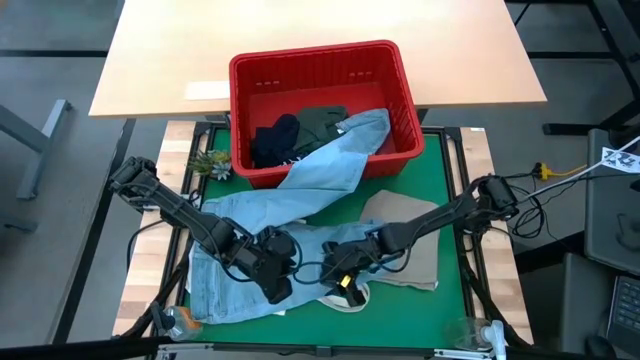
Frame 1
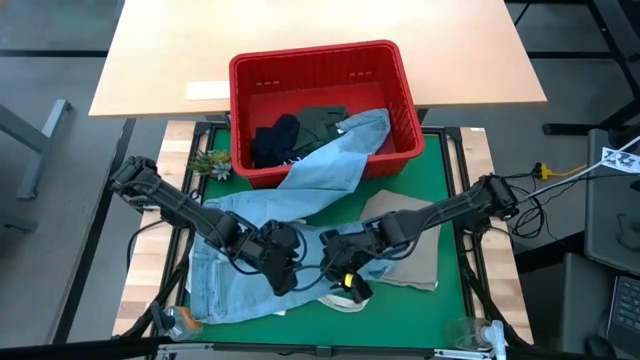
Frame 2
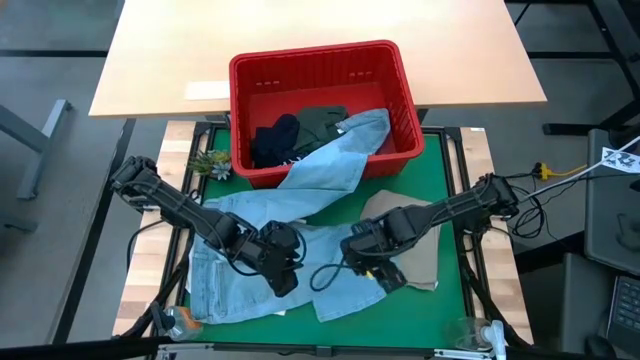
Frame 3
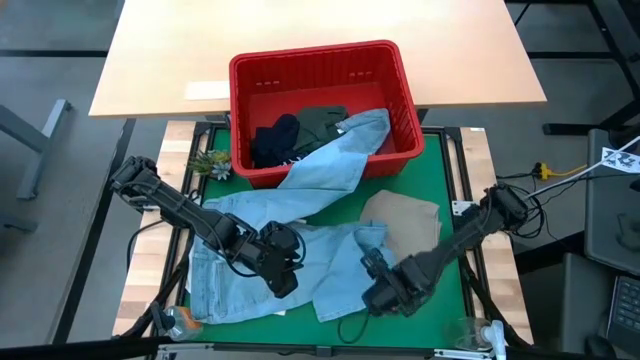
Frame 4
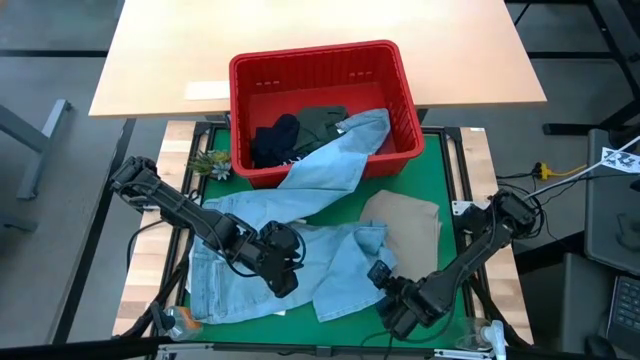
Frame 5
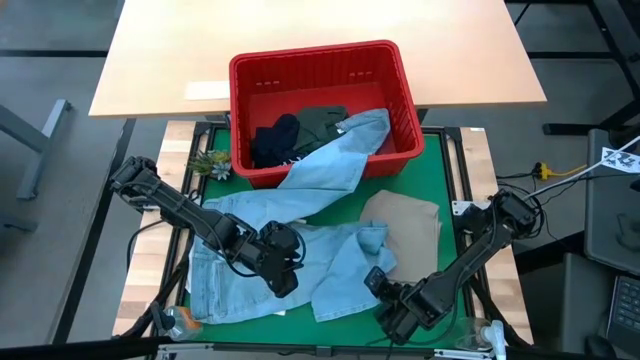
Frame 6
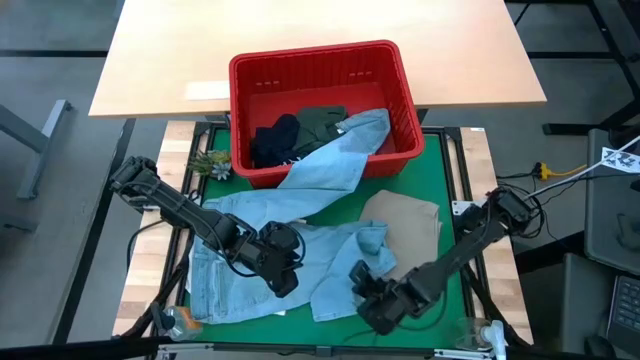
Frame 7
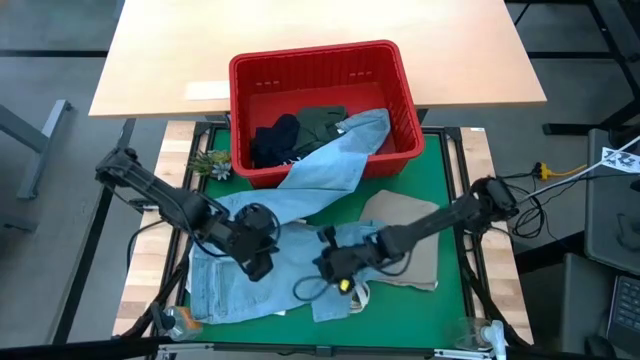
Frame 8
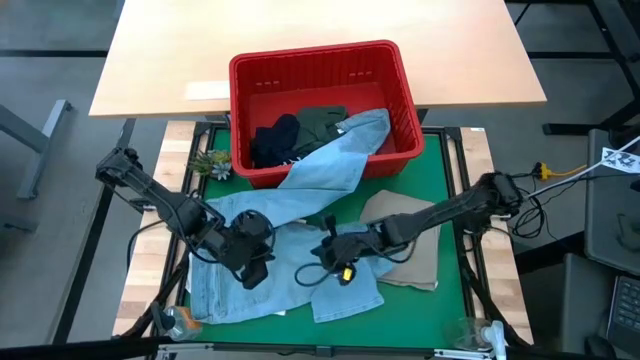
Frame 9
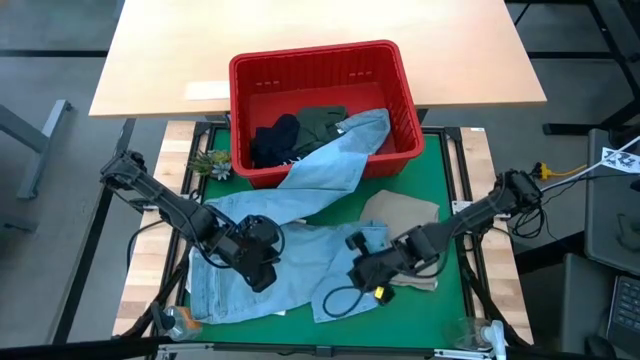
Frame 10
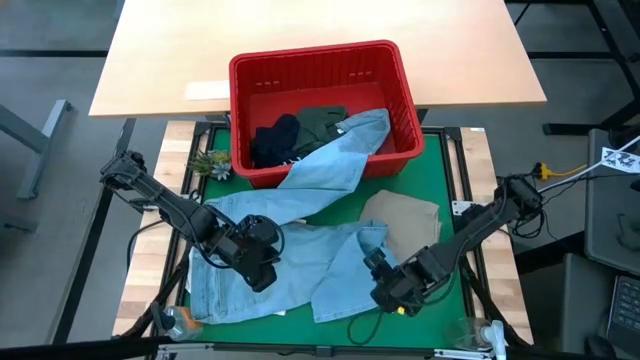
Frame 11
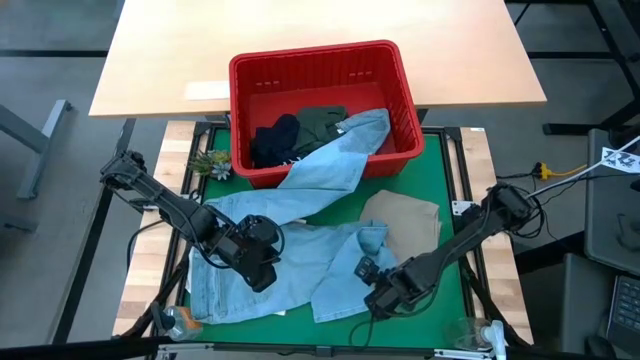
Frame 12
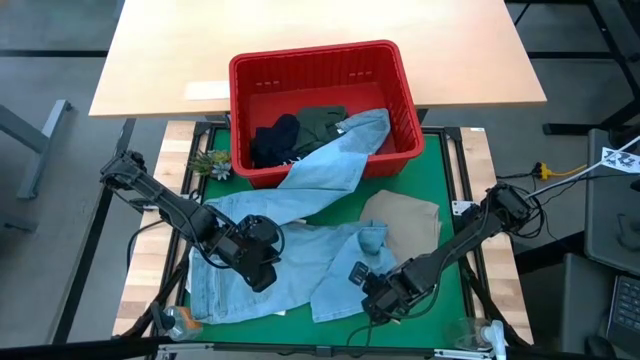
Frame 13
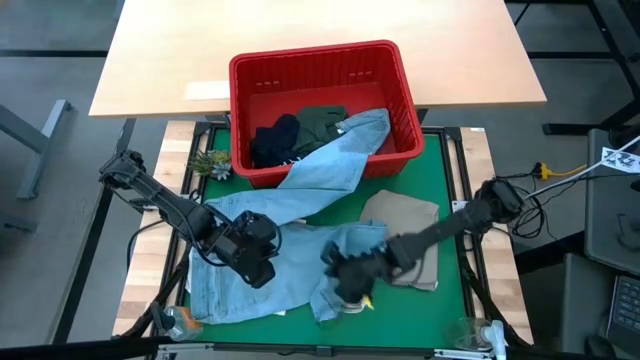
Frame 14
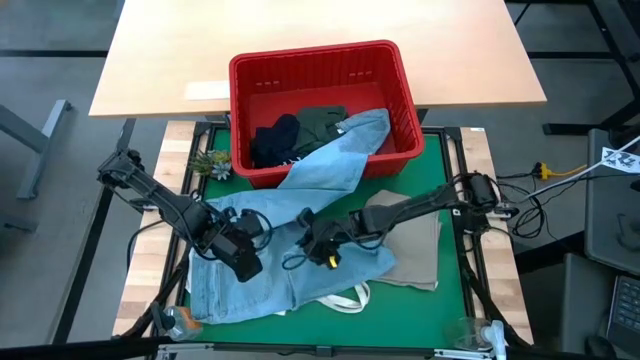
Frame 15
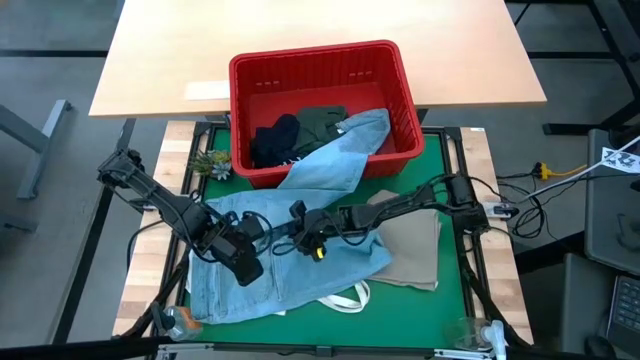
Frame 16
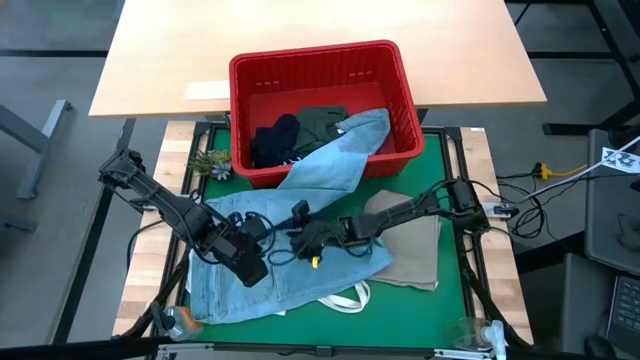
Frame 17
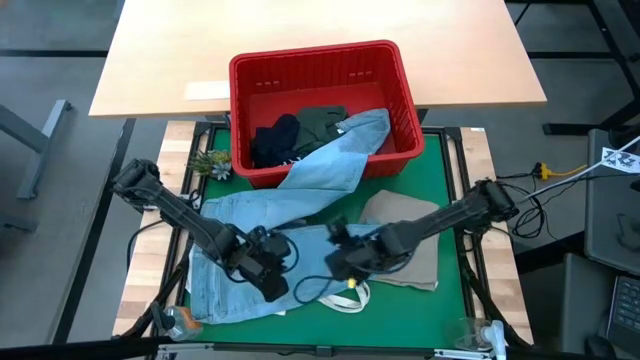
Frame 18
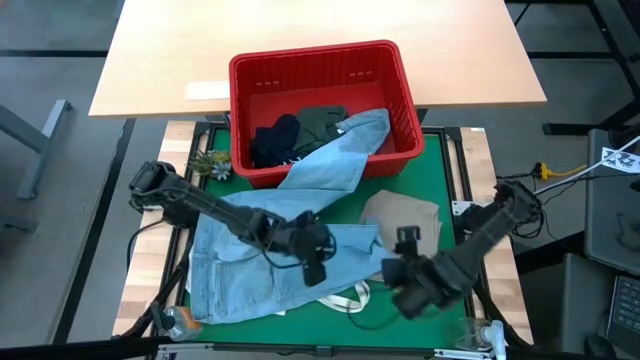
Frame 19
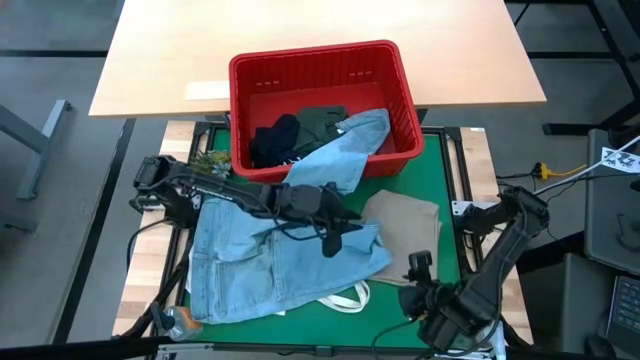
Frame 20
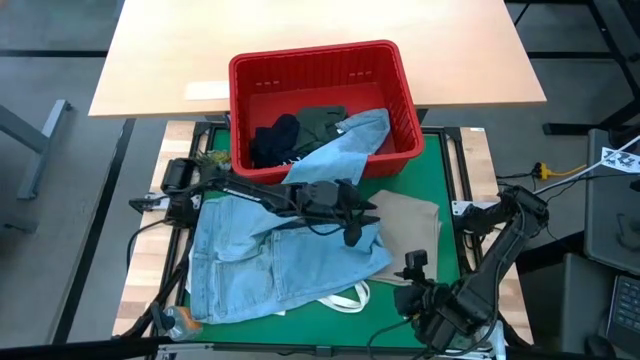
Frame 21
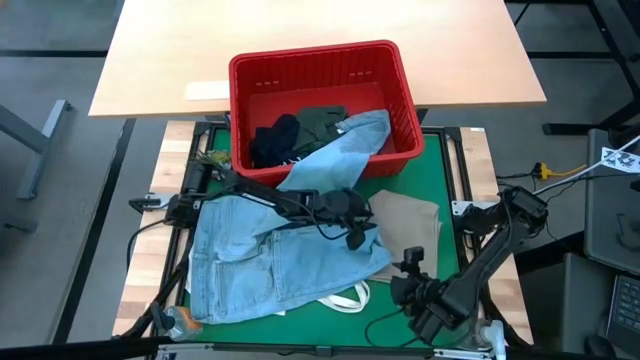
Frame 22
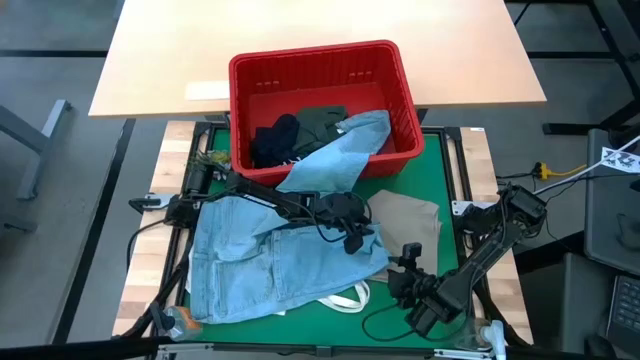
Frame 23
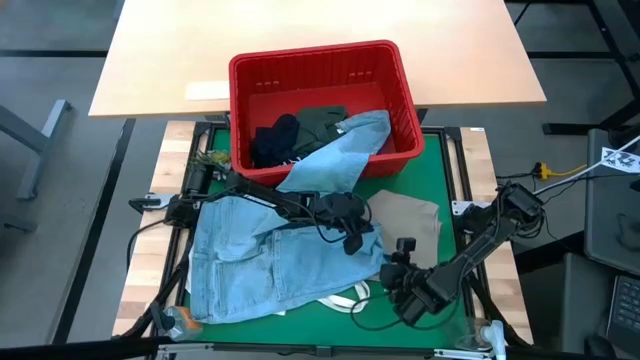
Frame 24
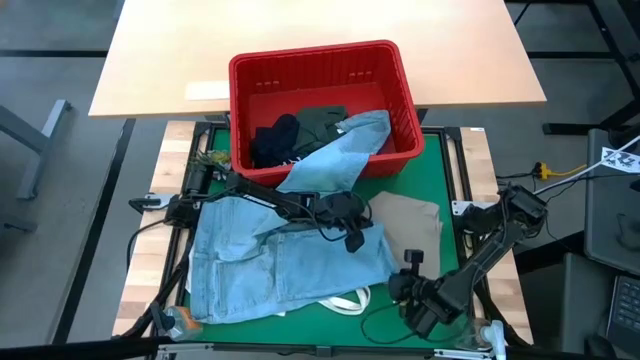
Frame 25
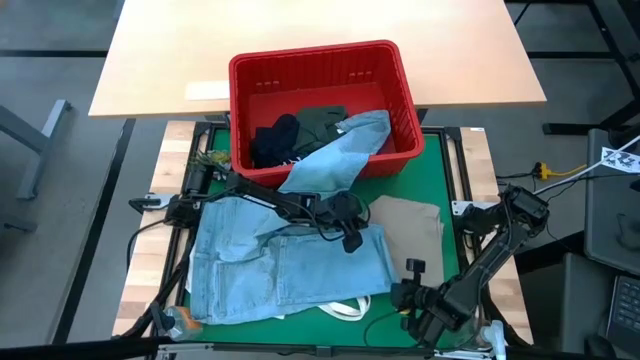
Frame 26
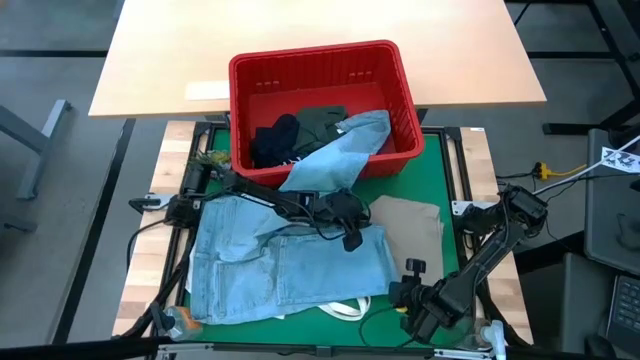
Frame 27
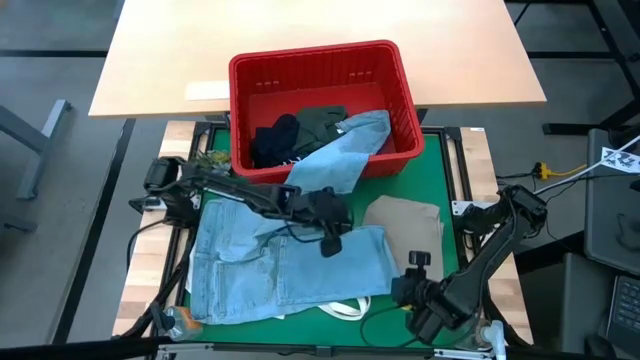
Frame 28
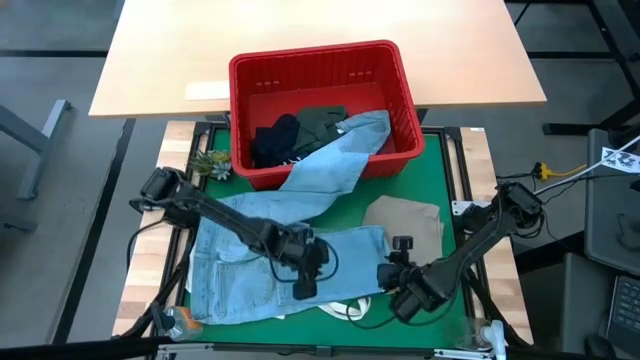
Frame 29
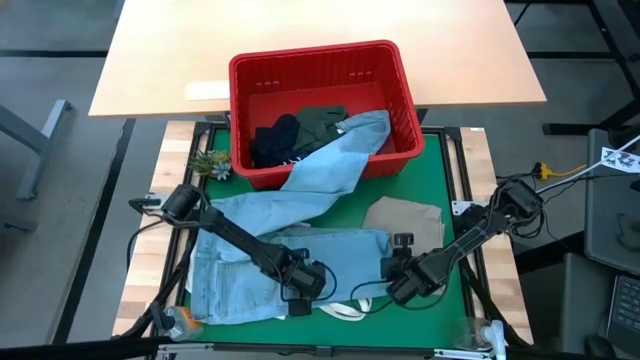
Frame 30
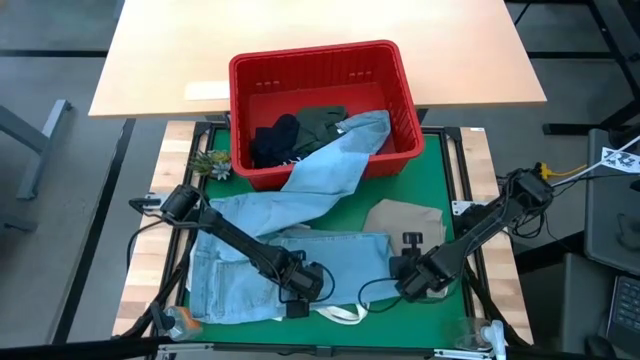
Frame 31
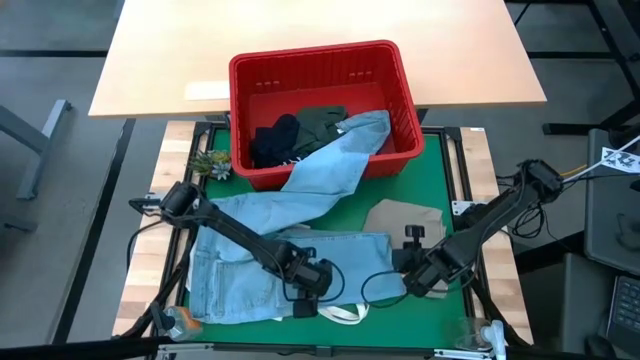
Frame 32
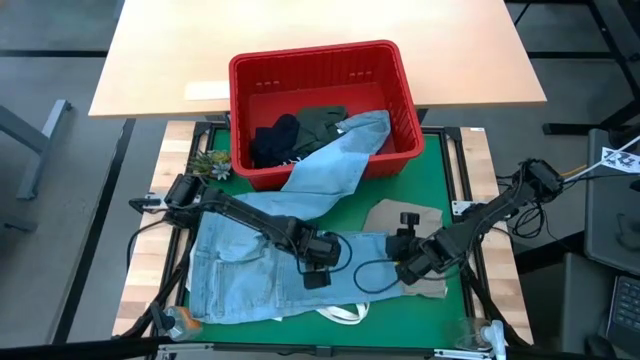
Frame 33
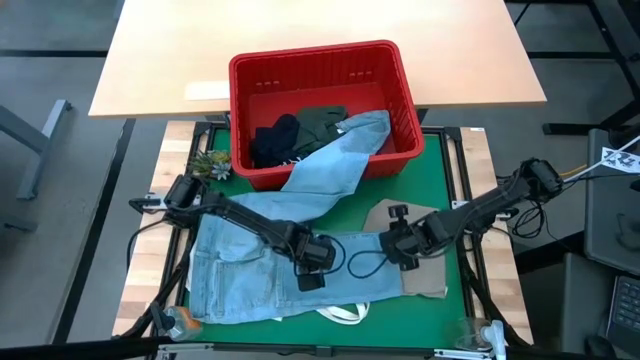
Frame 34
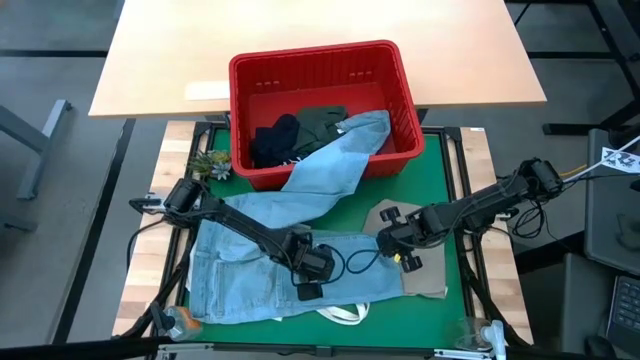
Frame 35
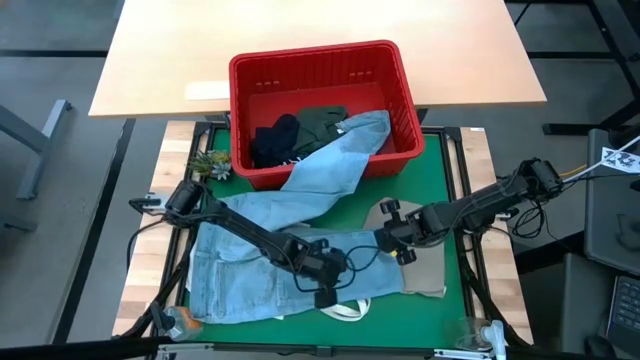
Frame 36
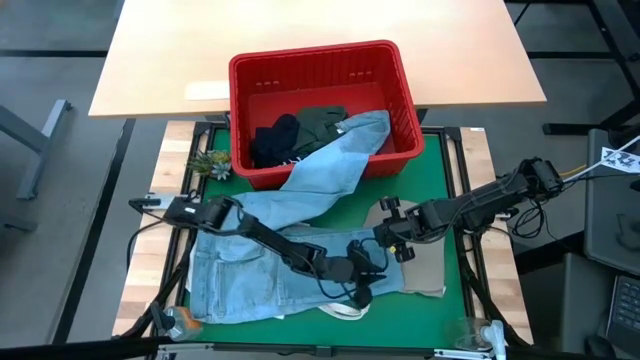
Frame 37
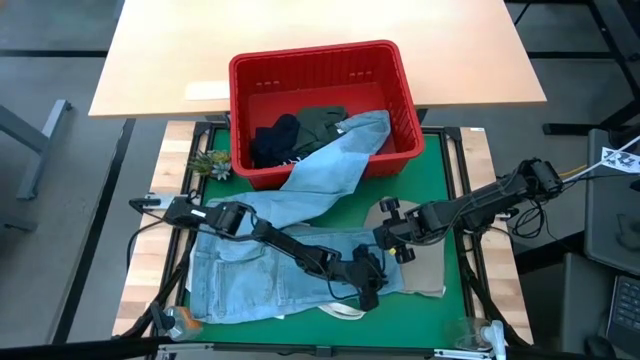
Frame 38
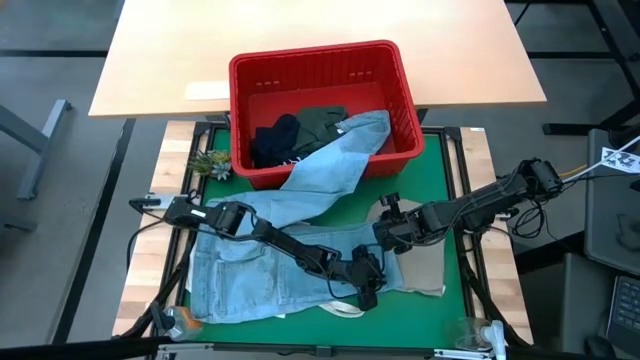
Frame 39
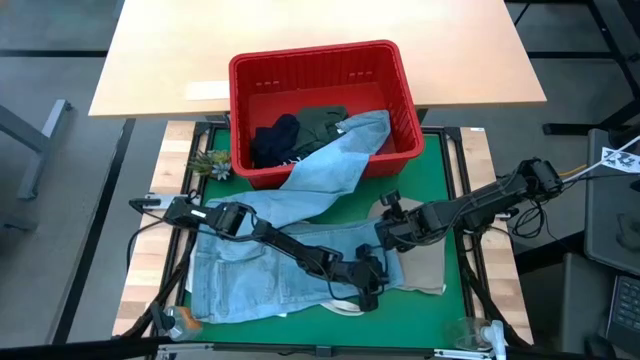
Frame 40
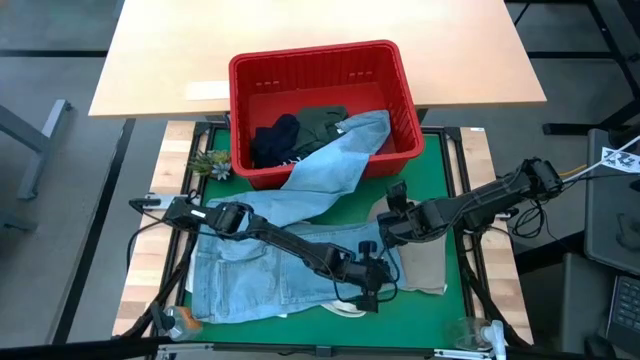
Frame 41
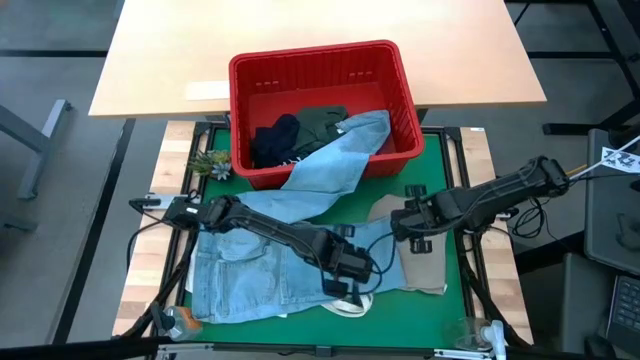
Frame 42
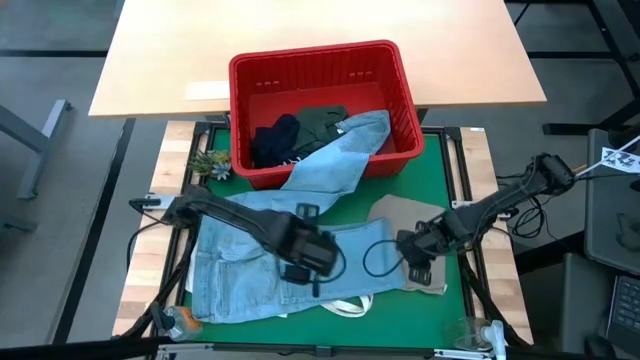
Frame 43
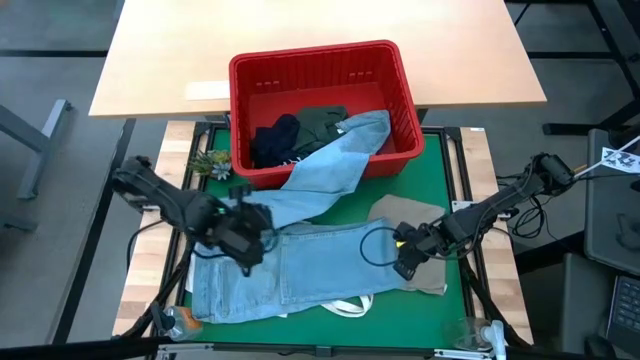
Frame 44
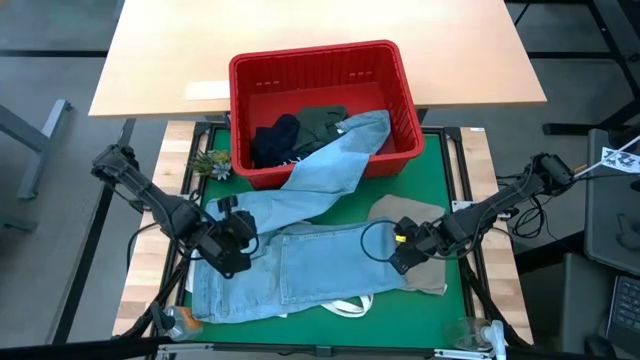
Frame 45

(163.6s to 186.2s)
Task: Fold Laundry from Bin
Fold the light blue pants
